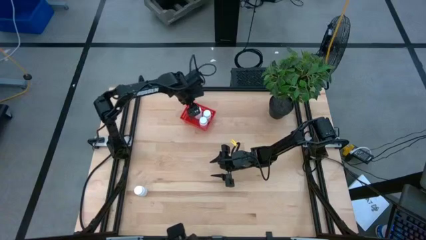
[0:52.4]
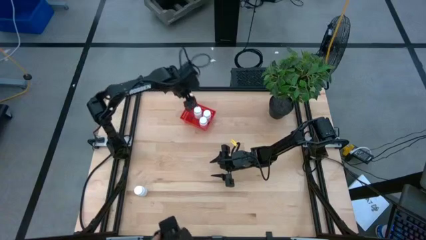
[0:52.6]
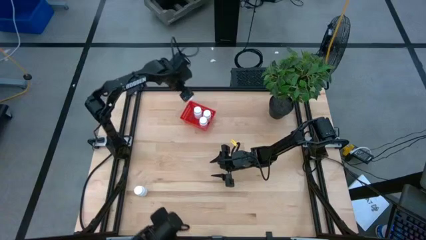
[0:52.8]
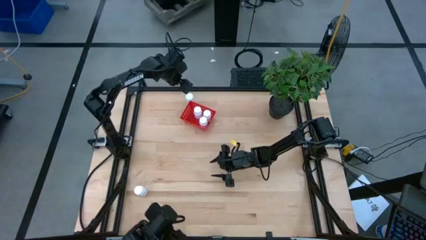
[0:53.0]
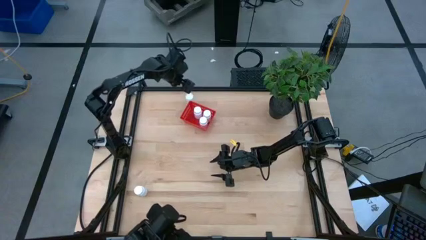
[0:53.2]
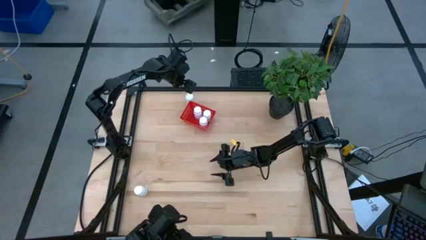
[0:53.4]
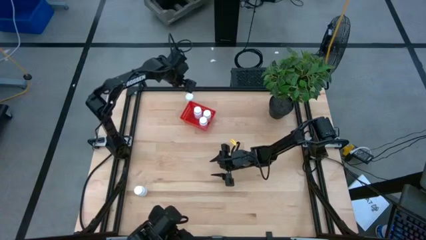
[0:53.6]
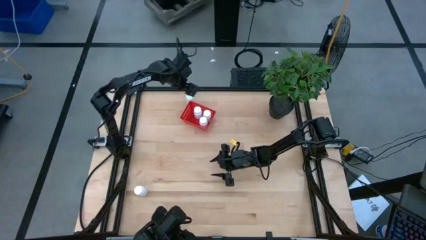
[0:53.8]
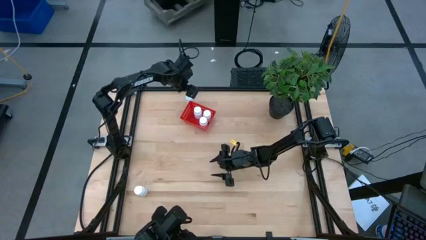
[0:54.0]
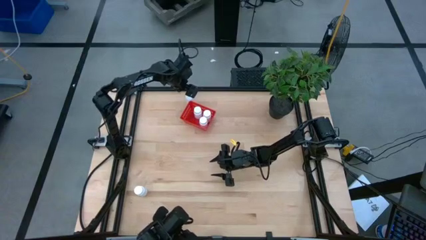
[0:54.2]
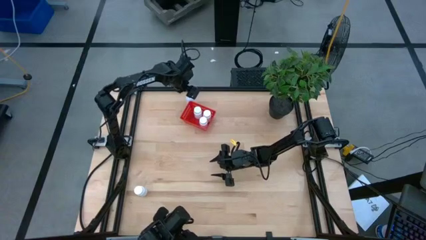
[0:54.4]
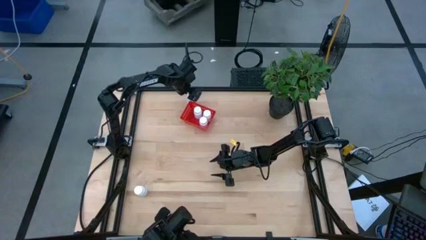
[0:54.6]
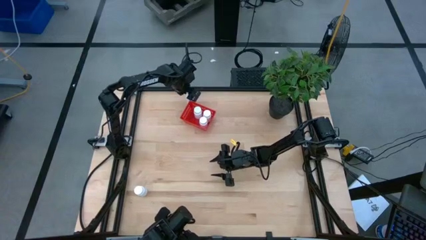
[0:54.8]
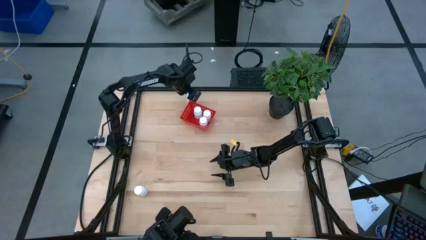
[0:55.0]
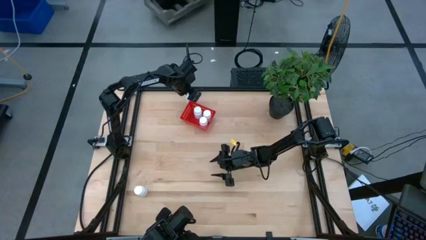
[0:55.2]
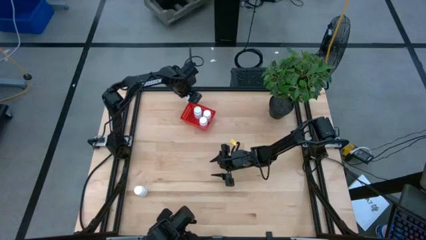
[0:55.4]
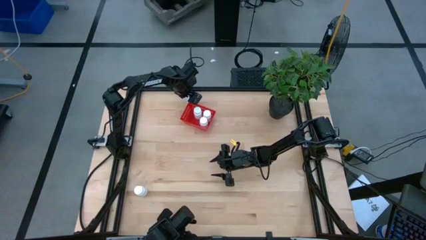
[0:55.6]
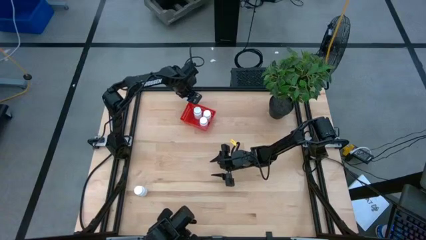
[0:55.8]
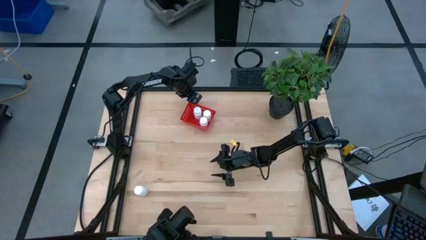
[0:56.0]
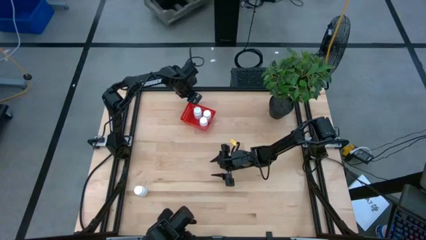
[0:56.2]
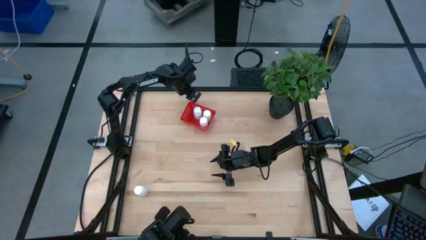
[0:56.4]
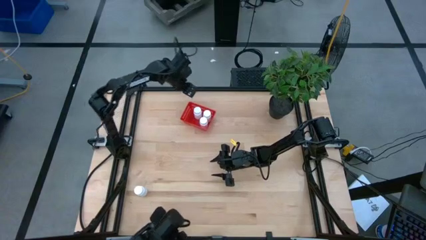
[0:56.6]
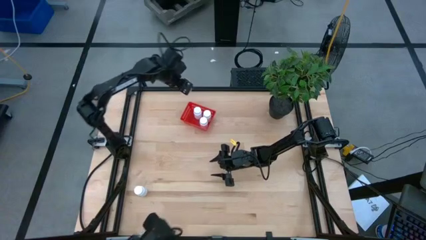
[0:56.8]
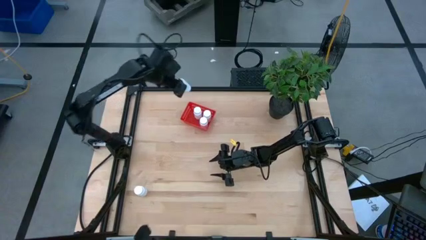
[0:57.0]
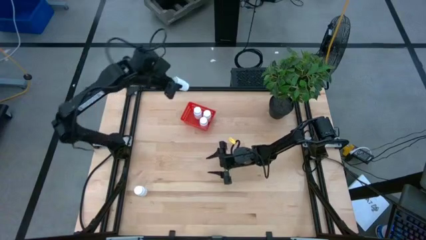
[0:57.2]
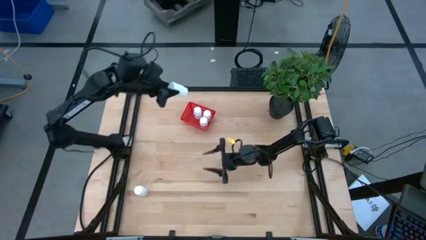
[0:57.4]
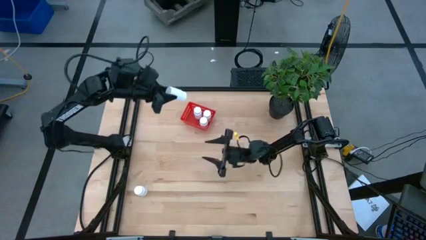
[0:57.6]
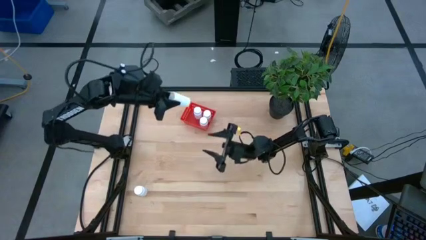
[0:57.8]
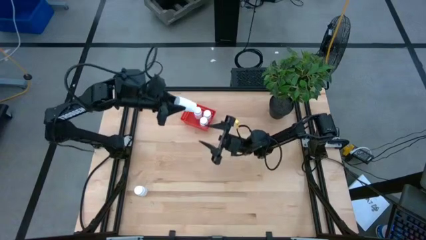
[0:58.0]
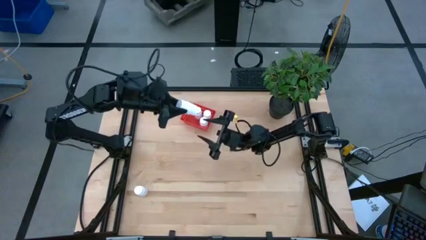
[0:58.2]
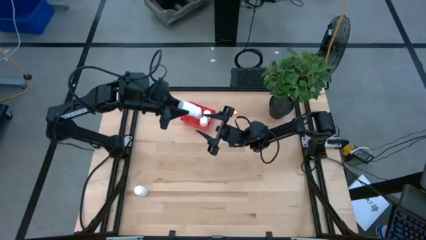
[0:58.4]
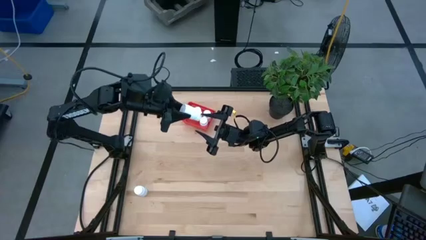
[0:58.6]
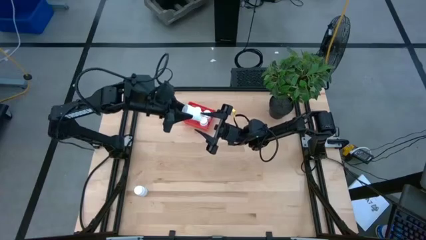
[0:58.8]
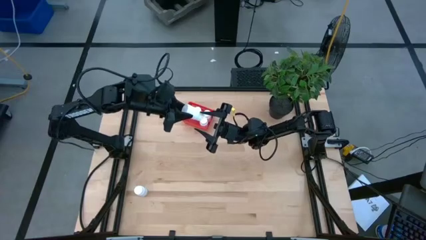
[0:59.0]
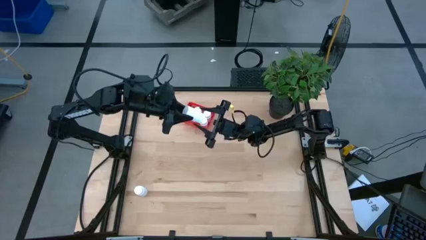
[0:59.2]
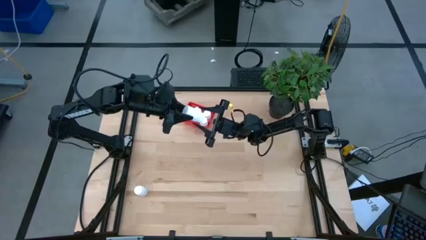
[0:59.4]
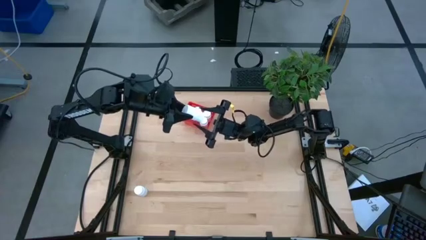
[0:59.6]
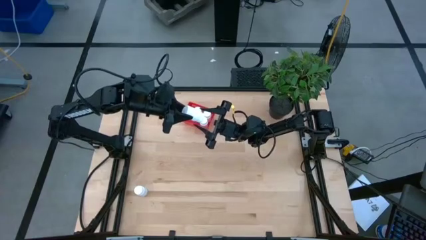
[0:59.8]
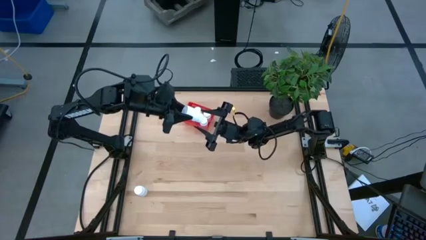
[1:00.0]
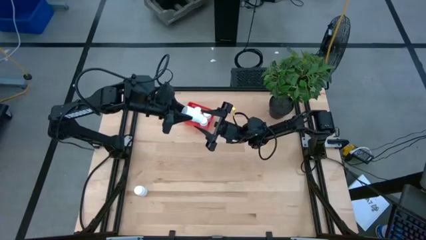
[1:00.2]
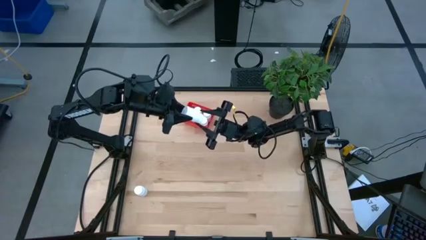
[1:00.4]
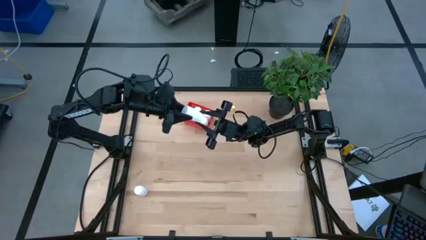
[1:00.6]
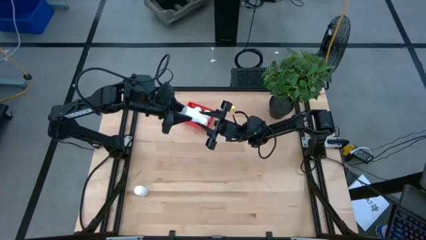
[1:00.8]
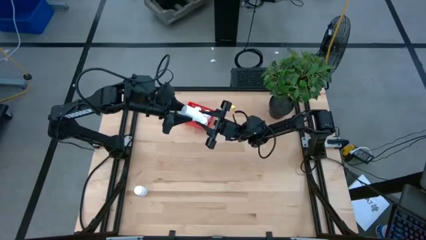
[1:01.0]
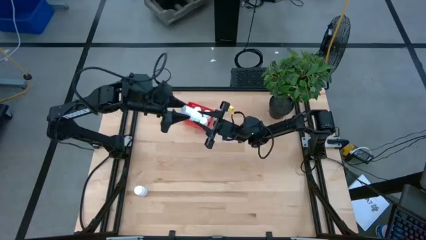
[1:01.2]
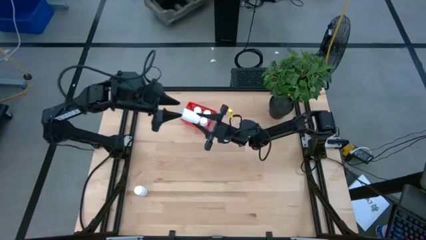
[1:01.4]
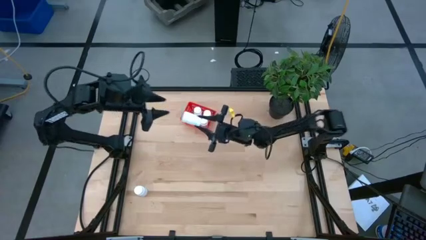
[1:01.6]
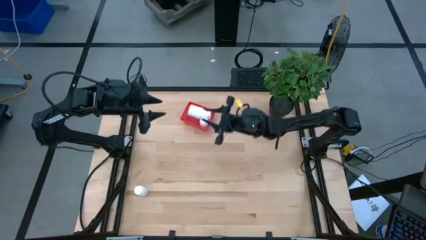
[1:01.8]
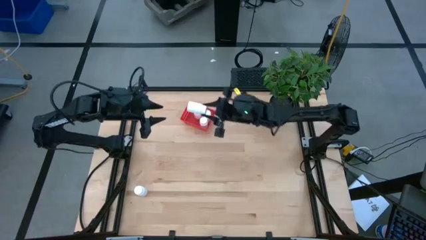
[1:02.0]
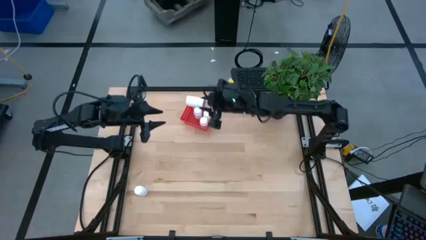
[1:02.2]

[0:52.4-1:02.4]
Task: Pick and place pill bottles into a basket
Put the white pill bottle into the orange basket

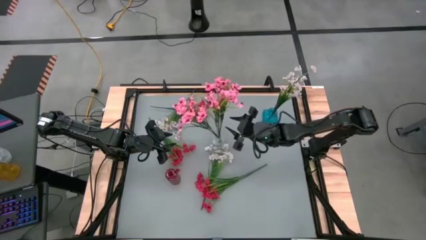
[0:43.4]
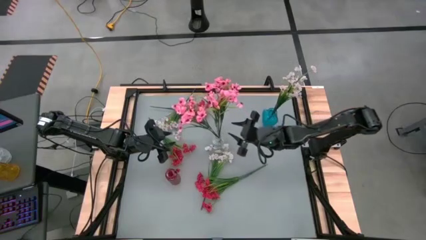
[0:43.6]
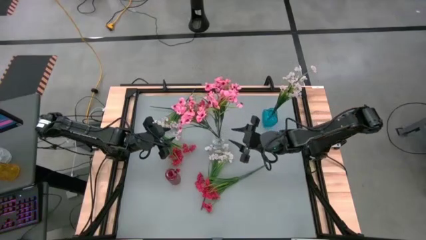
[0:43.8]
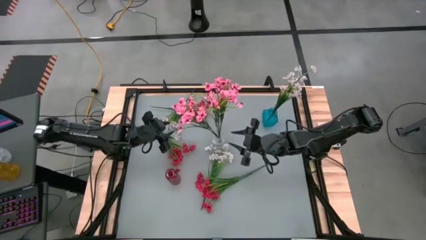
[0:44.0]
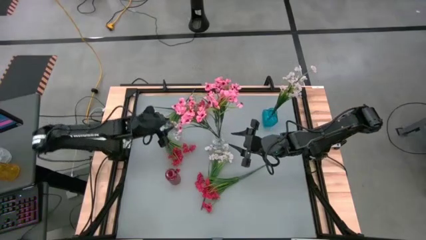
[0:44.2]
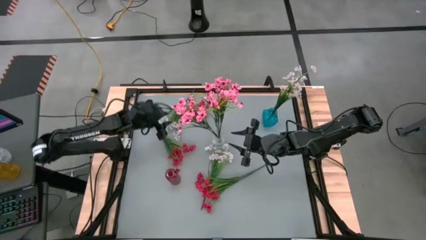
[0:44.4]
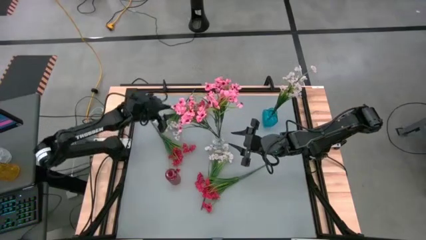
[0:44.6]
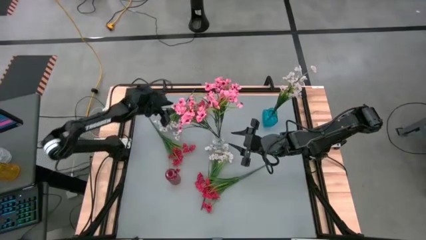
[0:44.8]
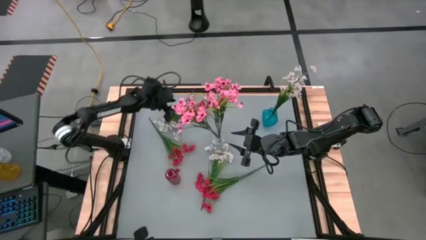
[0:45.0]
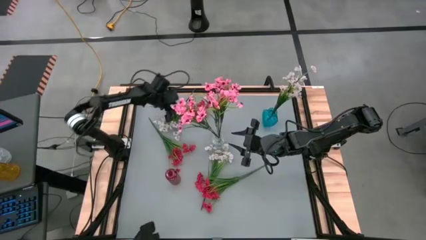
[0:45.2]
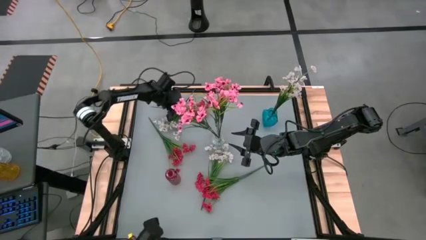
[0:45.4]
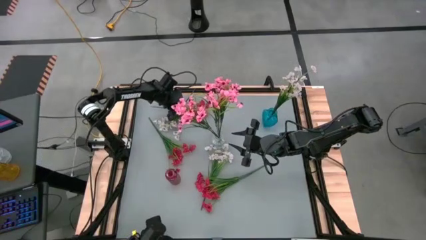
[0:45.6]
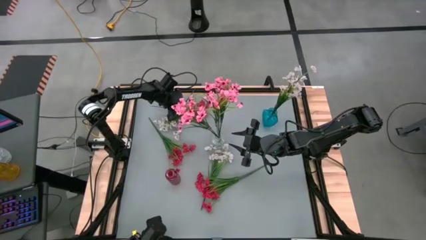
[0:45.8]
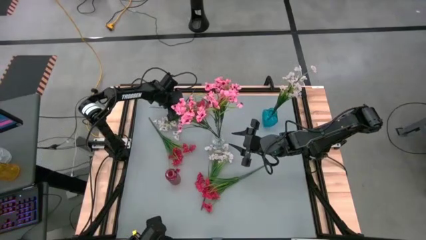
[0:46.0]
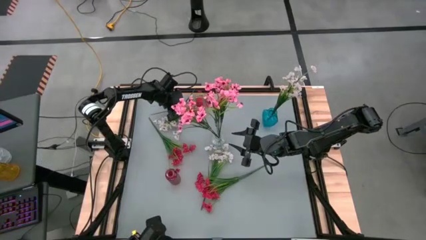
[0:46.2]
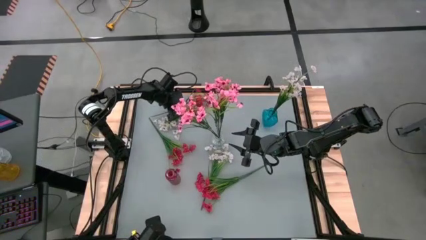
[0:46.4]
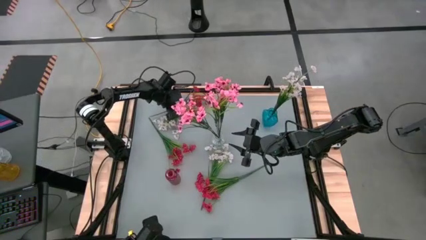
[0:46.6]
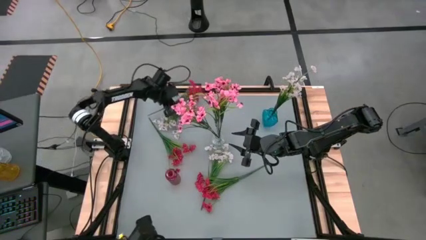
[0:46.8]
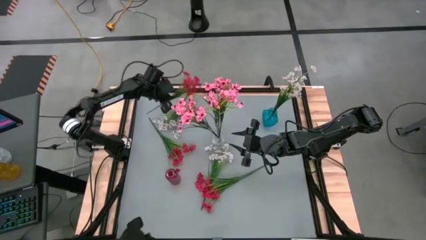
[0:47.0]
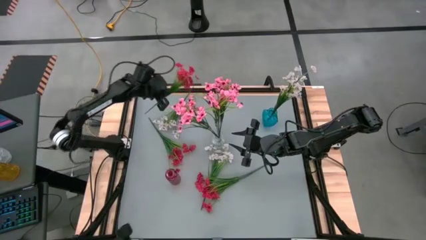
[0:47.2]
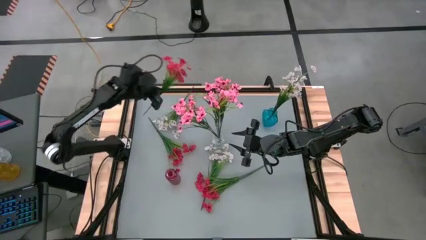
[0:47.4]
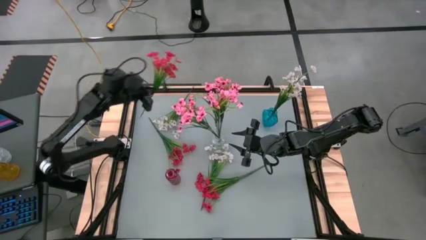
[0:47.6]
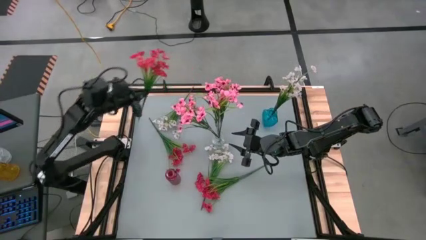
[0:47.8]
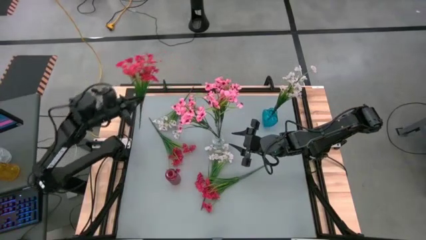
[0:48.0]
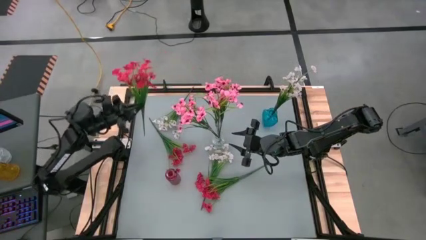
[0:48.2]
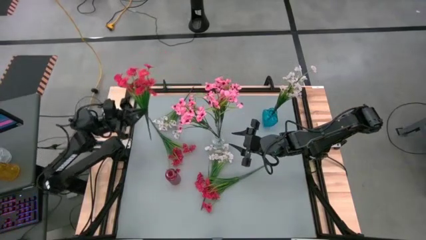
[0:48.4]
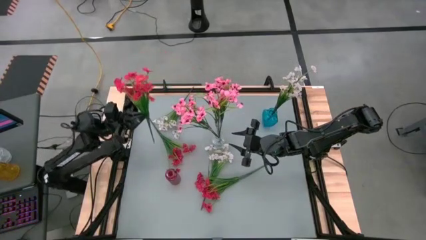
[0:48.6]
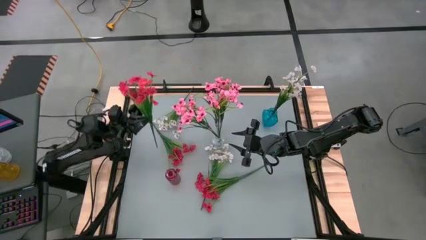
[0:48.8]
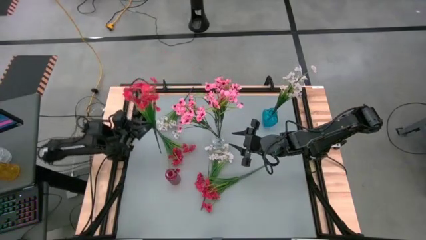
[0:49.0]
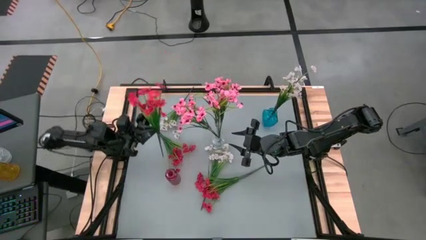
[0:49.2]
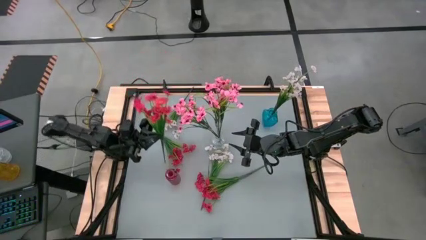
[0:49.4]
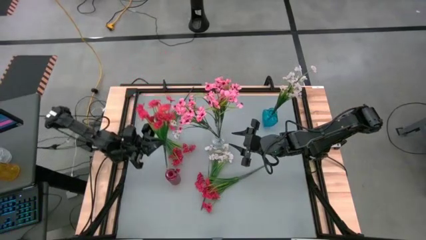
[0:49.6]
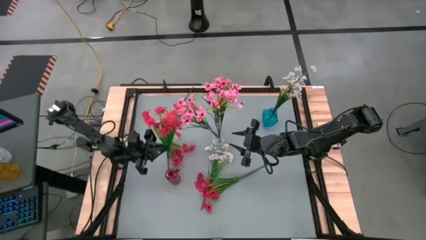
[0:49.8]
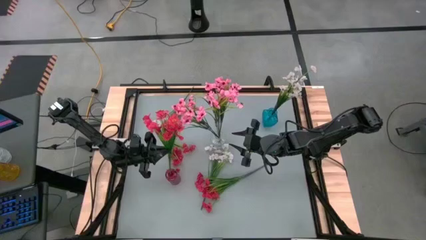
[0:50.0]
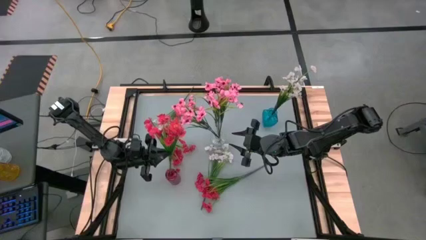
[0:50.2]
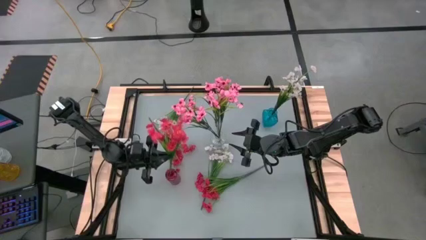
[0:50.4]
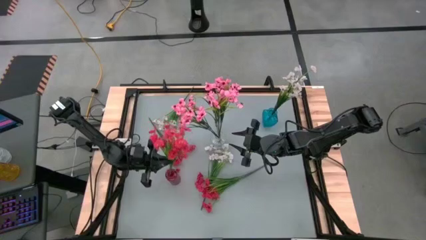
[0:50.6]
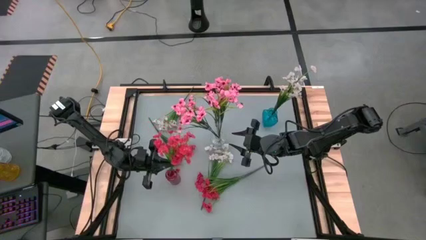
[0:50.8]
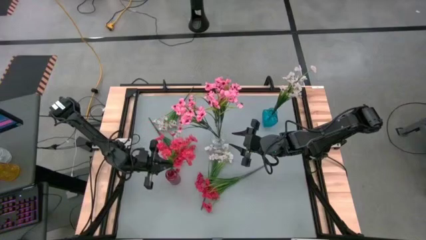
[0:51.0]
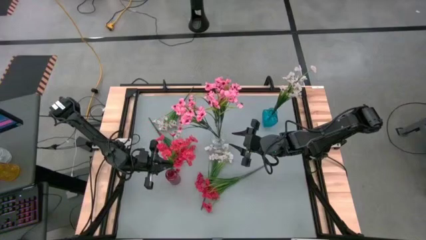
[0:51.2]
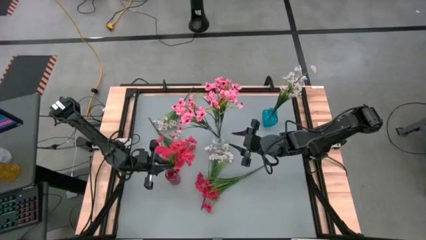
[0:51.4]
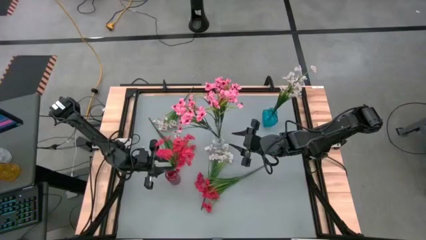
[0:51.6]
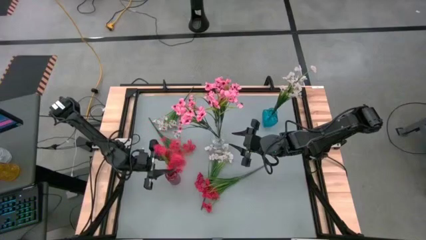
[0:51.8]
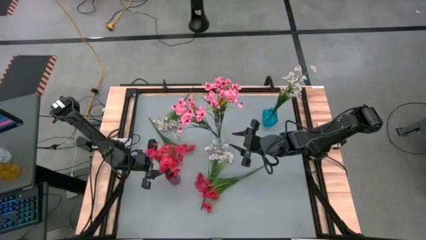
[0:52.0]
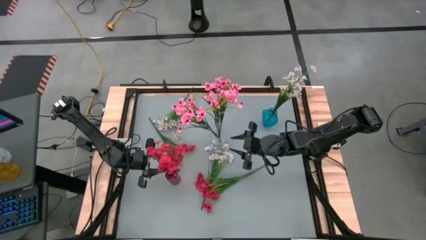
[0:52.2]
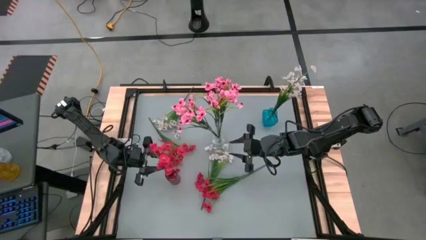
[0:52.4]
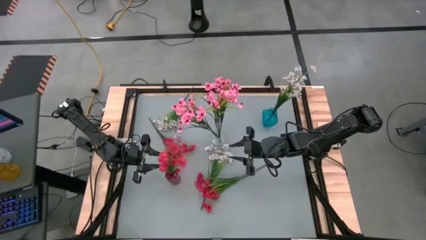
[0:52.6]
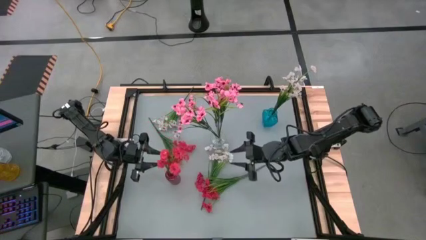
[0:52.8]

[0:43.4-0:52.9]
Task: Sort flowers into vase by color
Put the top red flowers into the red vase
